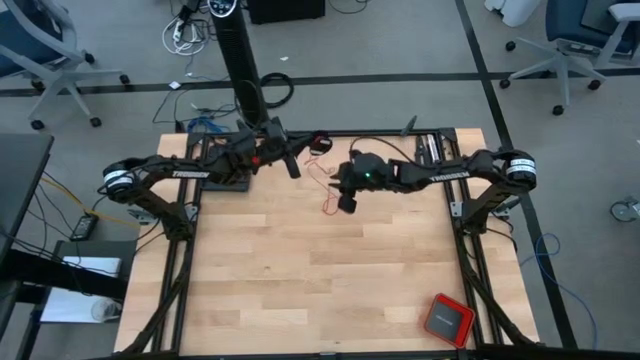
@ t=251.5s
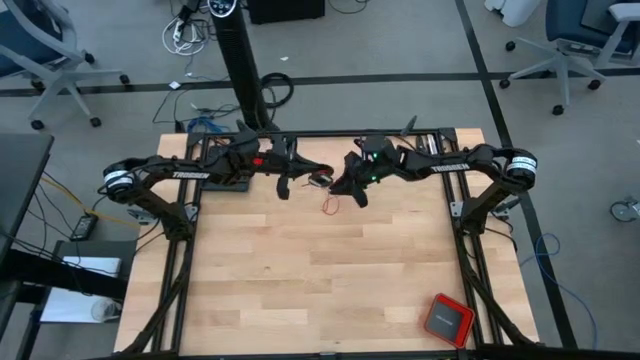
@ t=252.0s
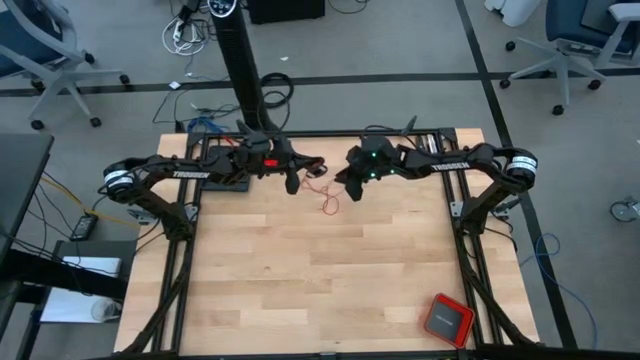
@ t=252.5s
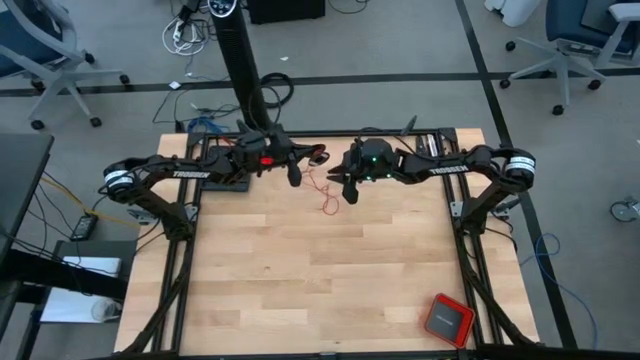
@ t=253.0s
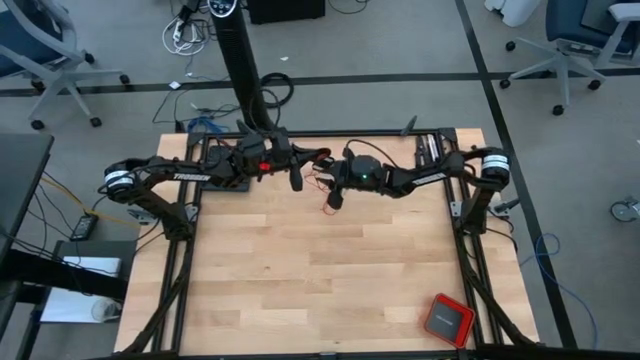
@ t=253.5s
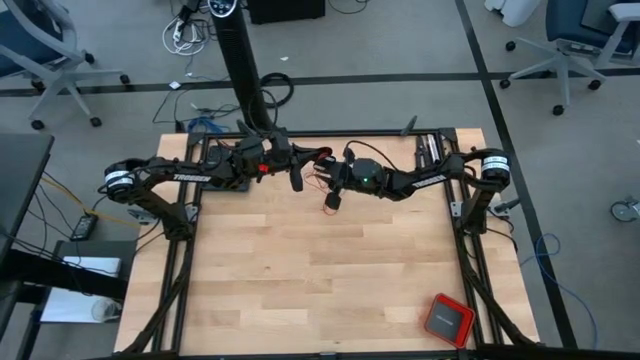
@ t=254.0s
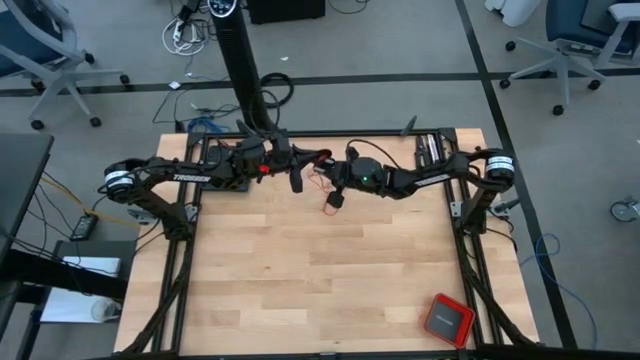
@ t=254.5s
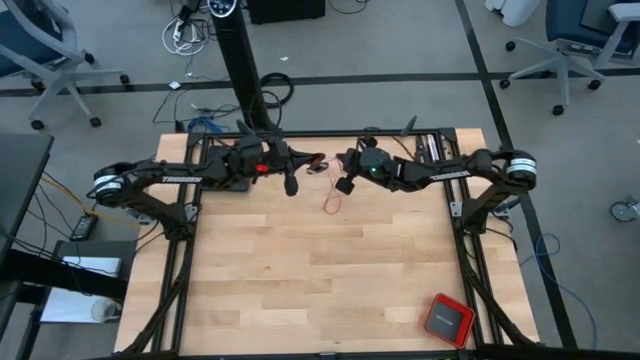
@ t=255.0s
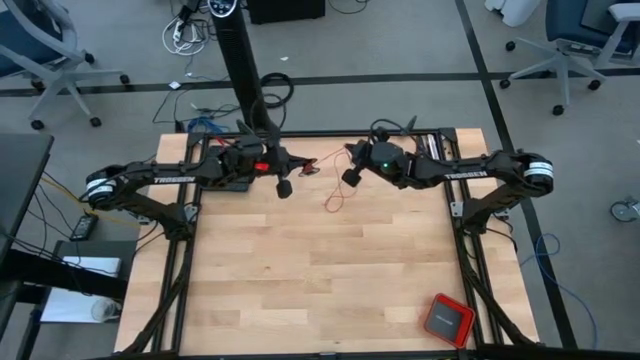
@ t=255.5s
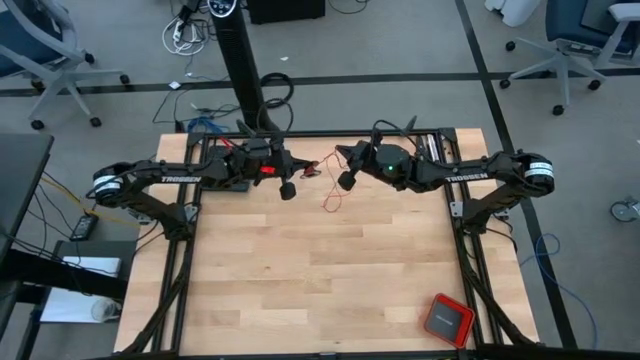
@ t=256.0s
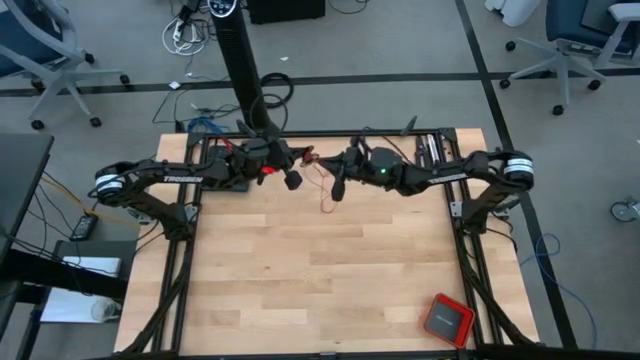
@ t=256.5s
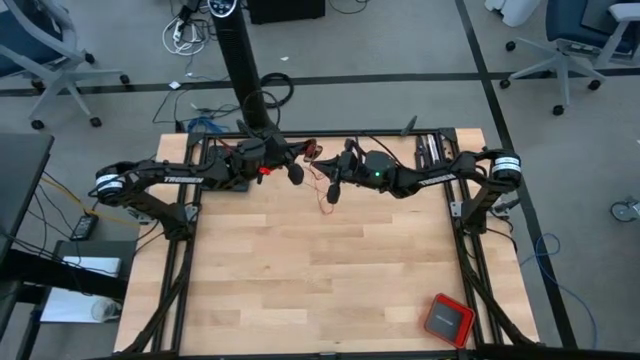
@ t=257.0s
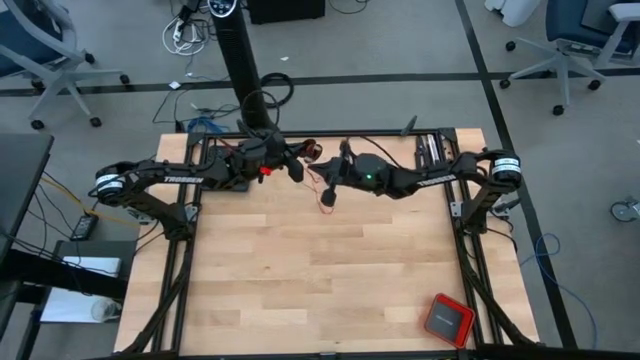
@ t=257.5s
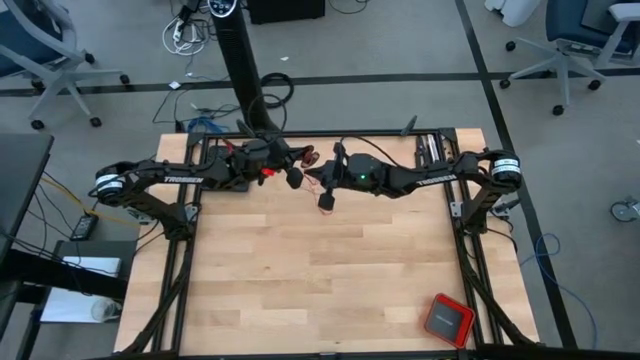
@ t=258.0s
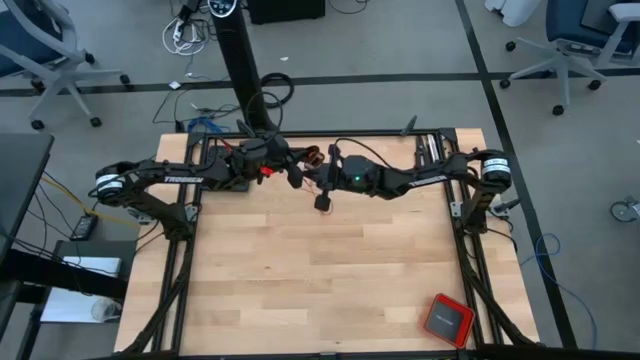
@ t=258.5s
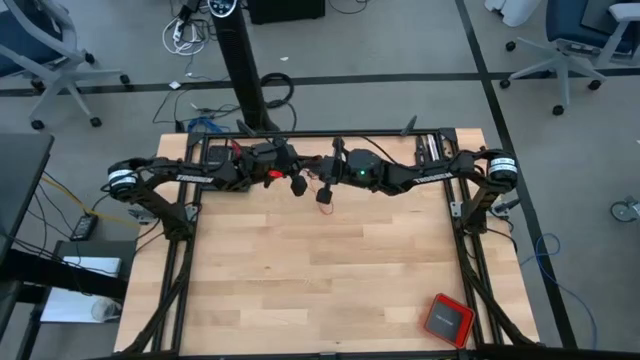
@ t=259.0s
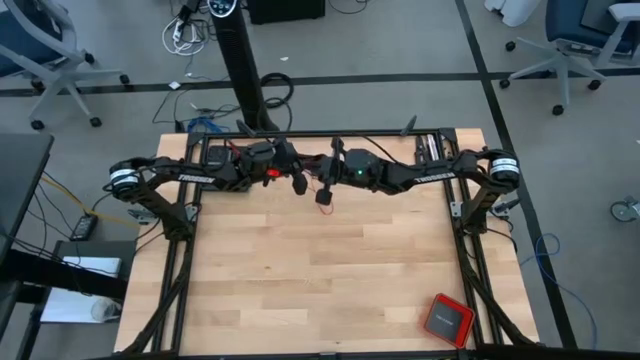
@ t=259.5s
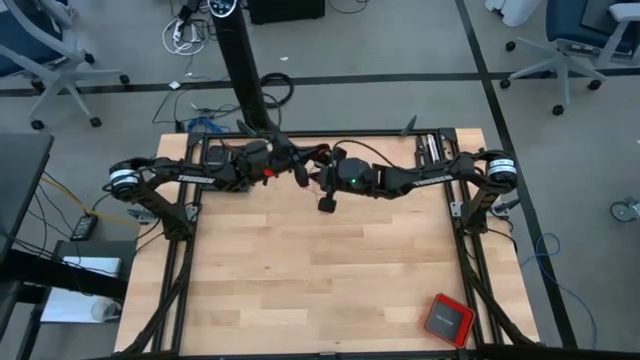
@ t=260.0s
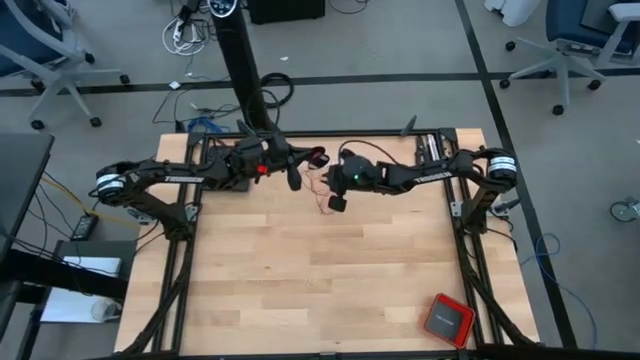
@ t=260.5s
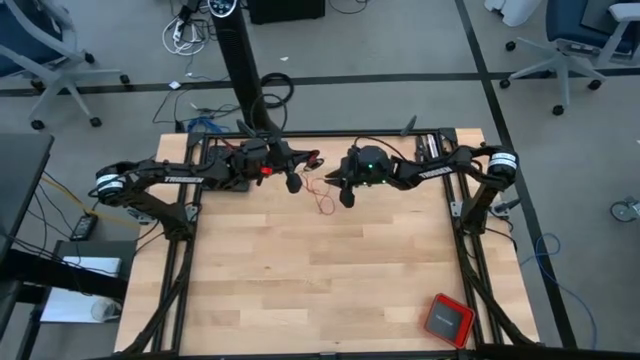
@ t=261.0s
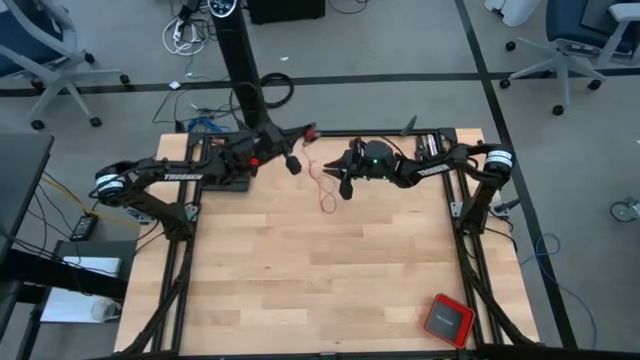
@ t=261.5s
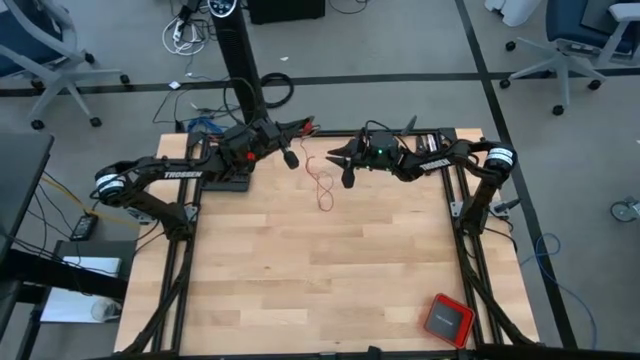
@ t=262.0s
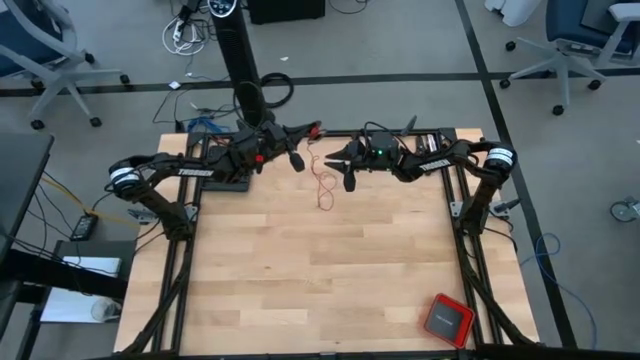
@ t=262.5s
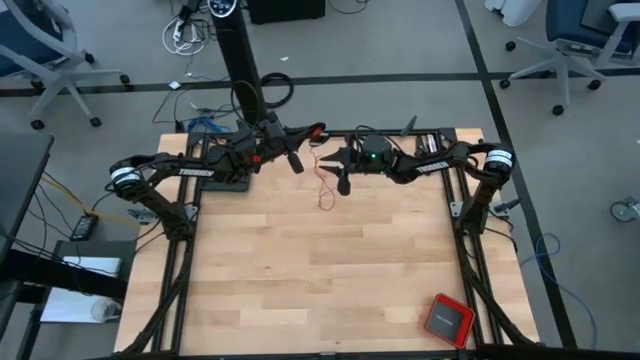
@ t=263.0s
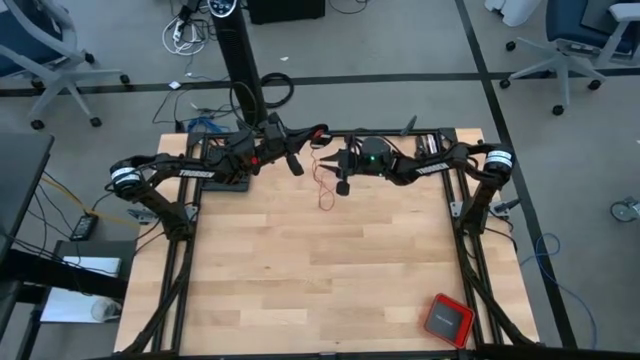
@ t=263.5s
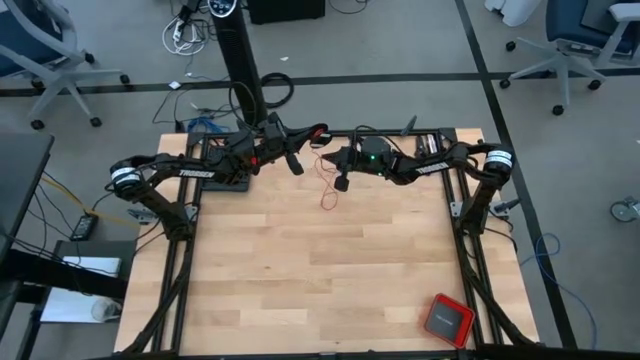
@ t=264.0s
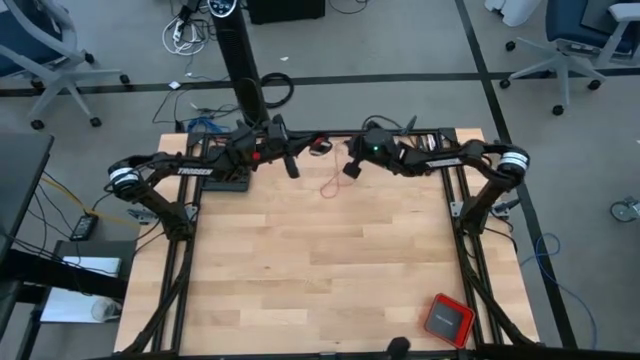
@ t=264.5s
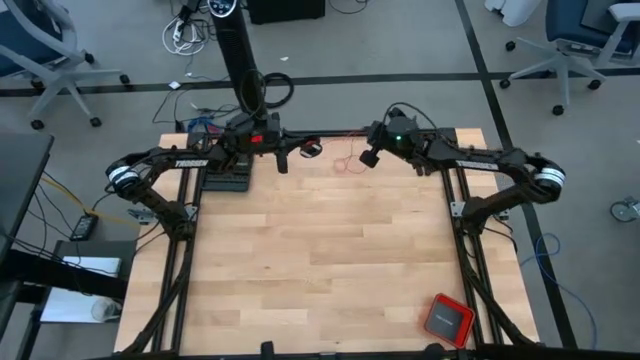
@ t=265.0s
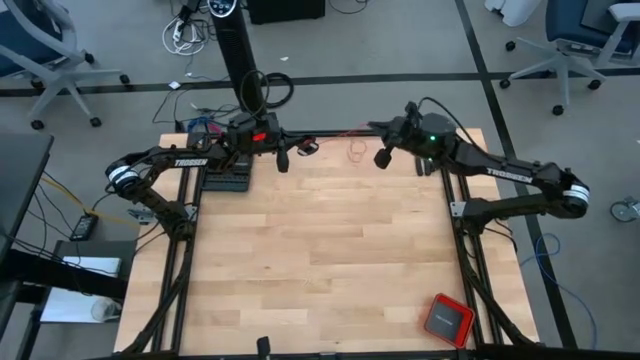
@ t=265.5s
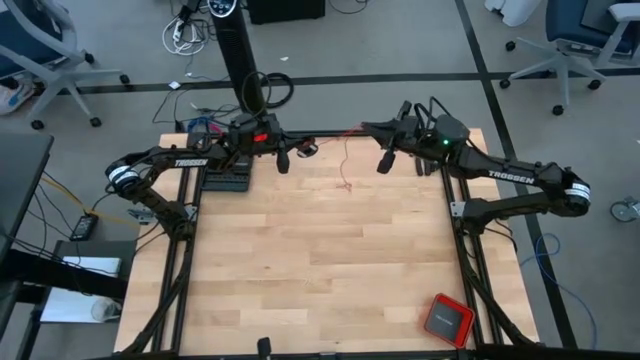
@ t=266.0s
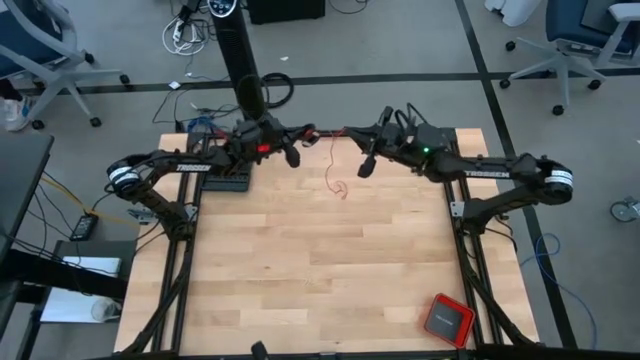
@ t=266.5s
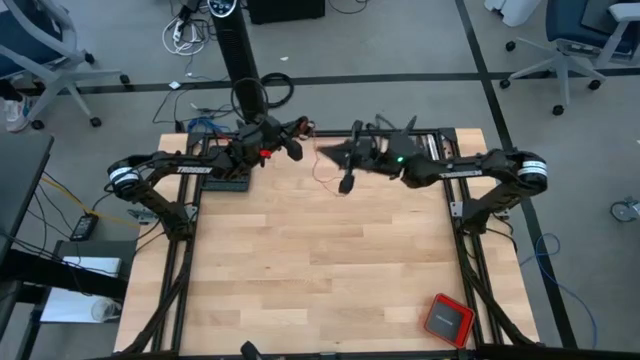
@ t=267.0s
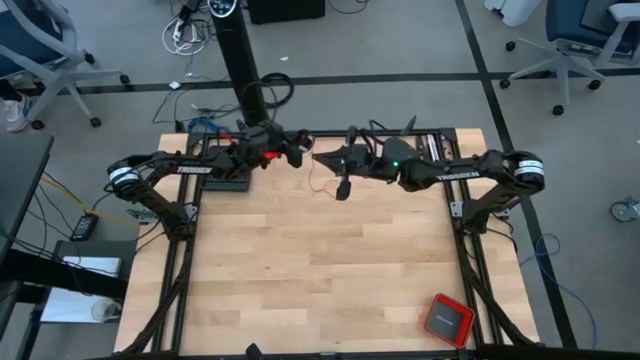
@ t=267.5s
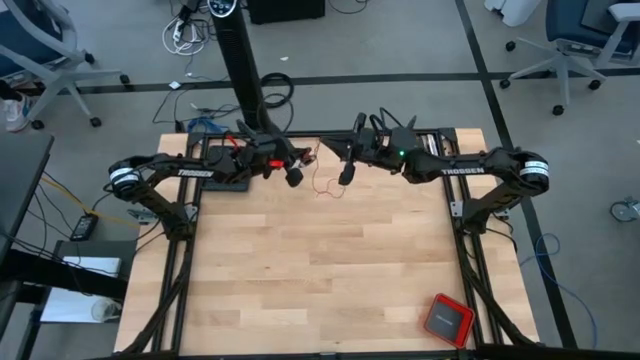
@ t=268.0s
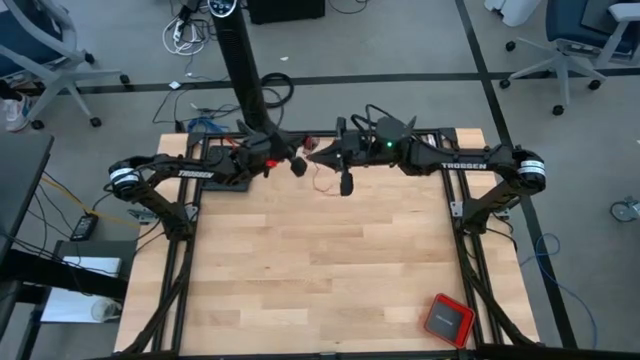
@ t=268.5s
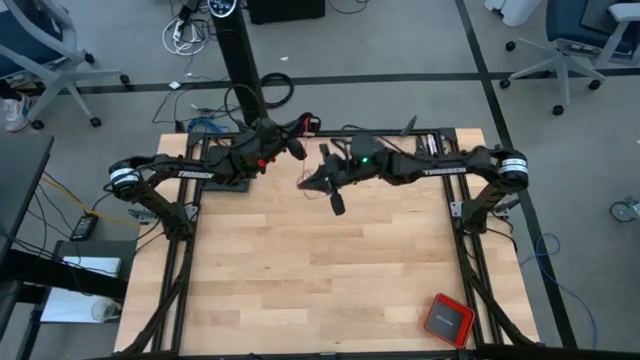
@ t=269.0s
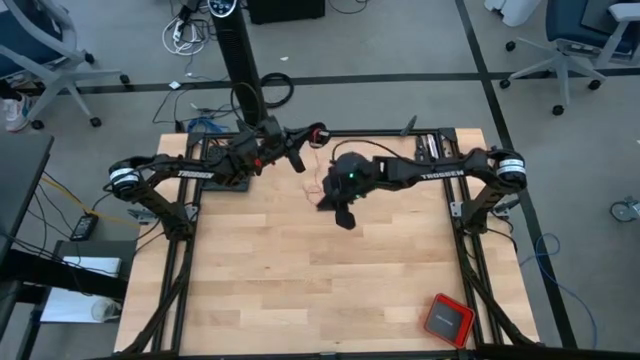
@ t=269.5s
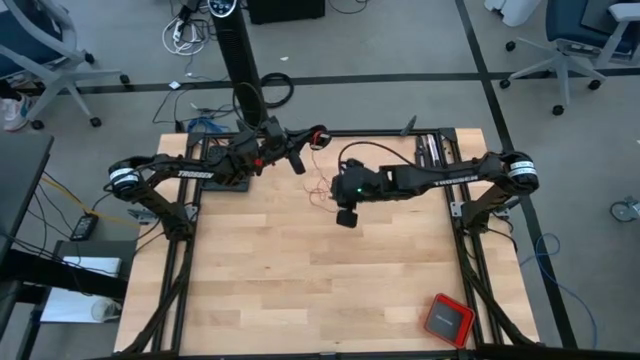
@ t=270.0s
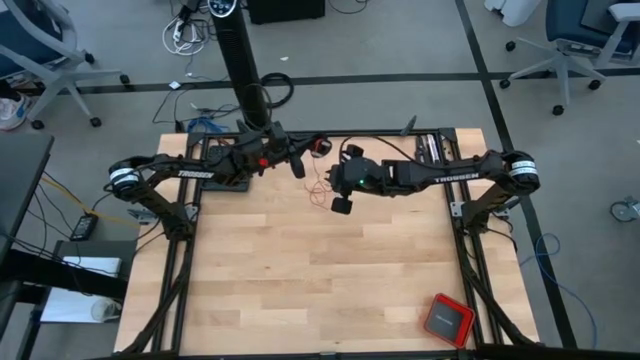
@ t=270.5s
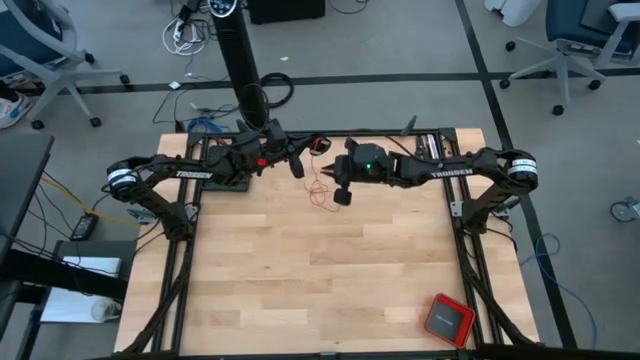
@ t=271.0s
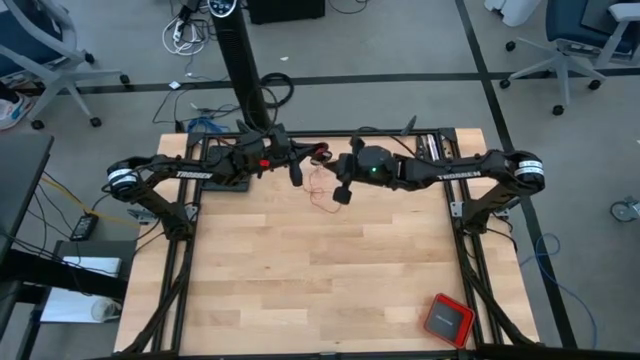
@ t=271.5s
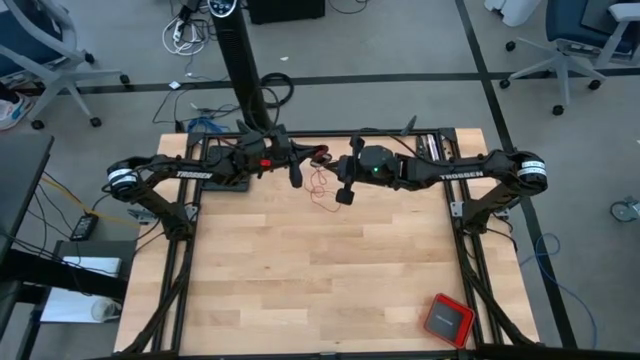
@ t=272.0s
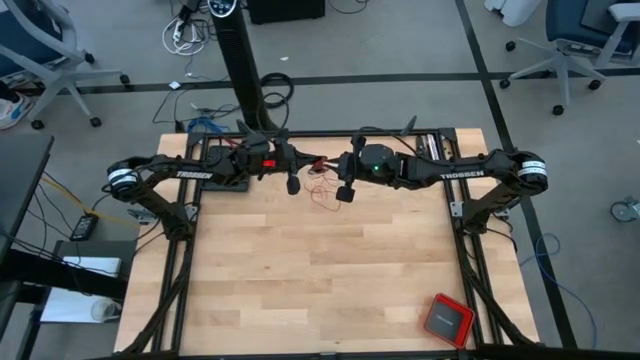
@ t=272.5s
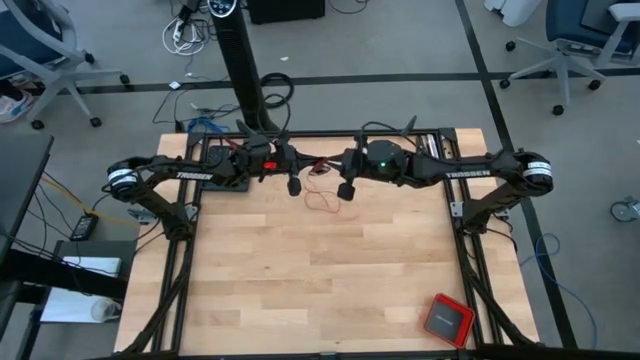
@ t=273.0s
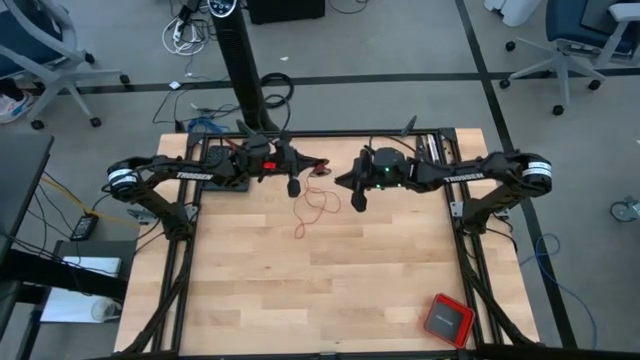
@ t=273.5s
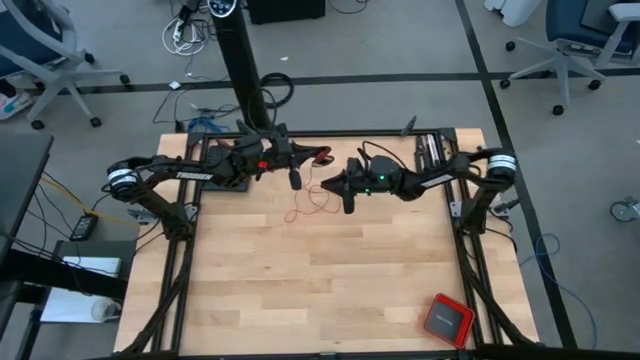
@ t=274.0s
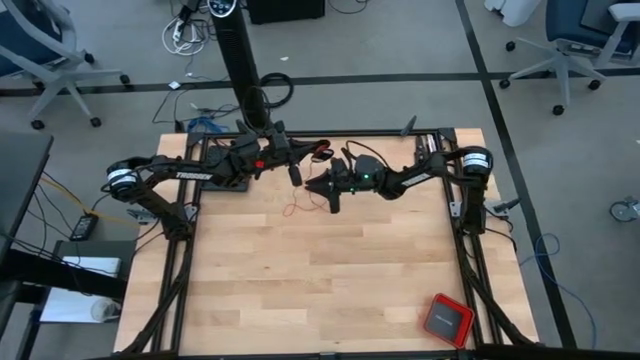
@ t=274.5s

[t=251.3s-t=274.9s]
Task: Coil cords
Coil the red wire onto the spool
